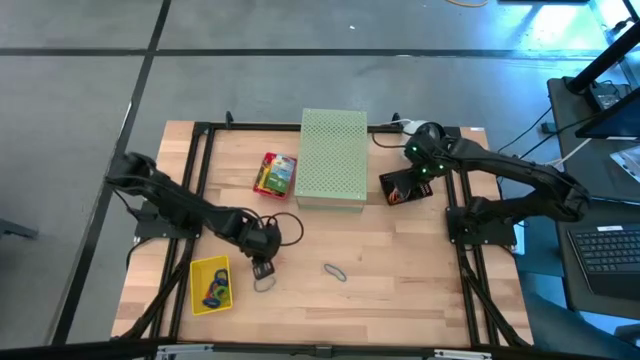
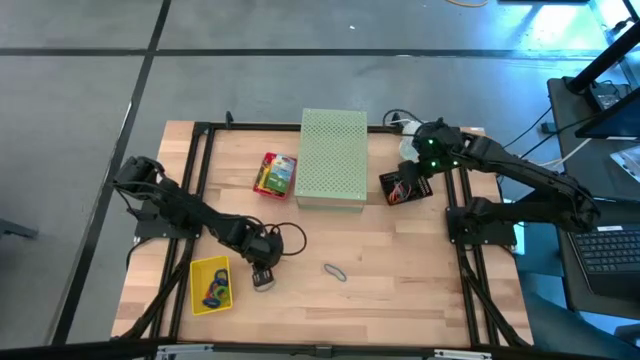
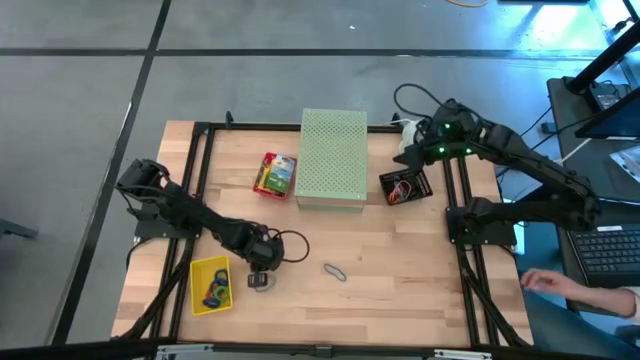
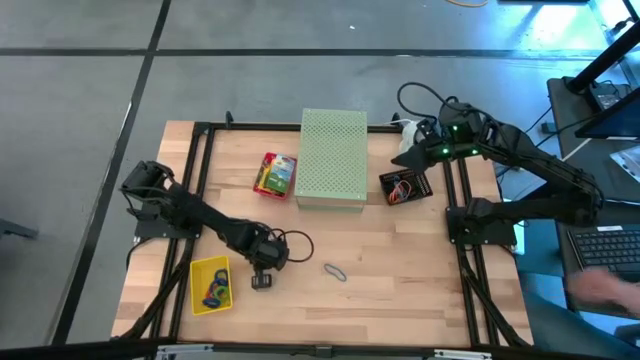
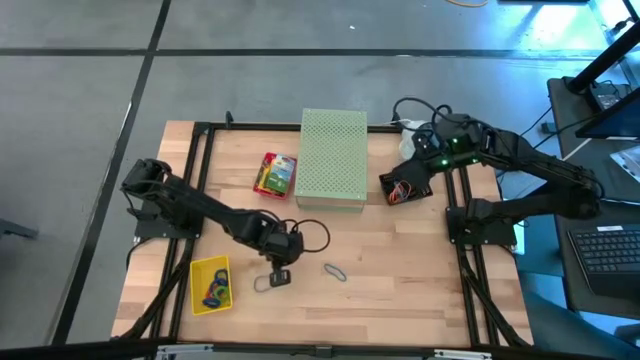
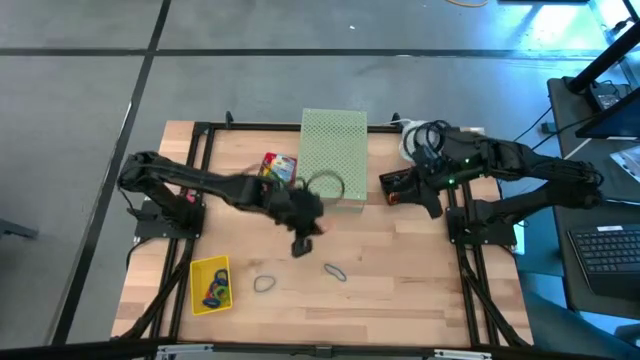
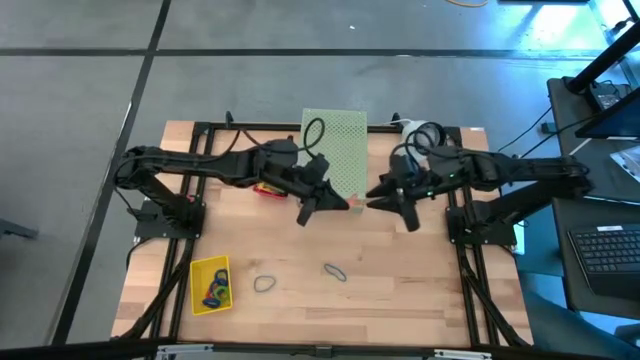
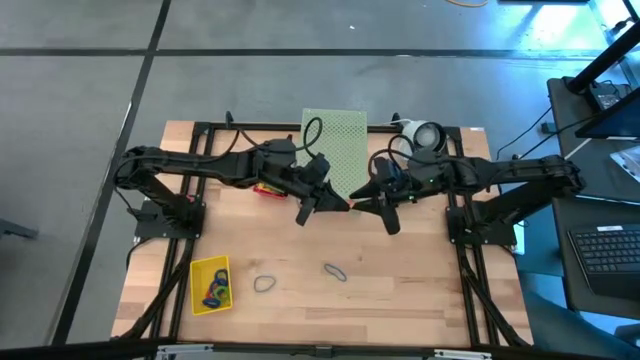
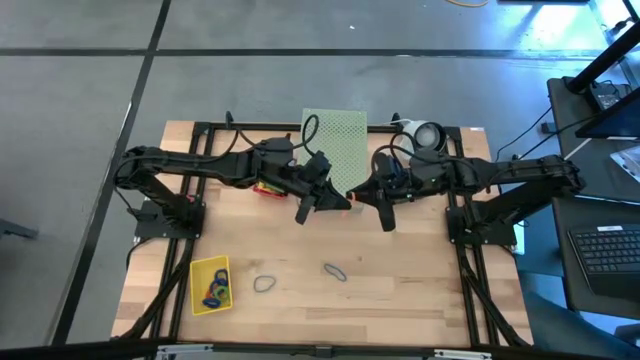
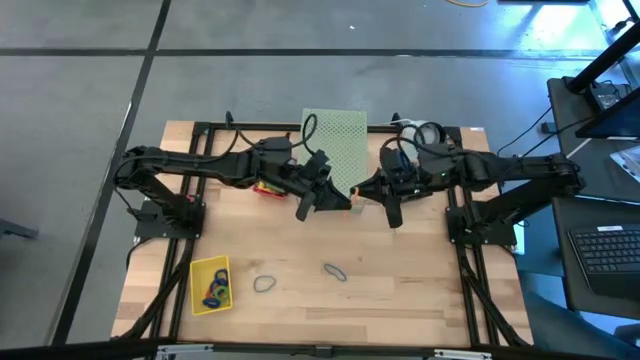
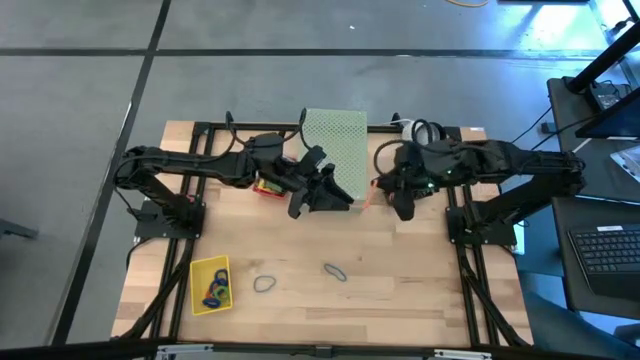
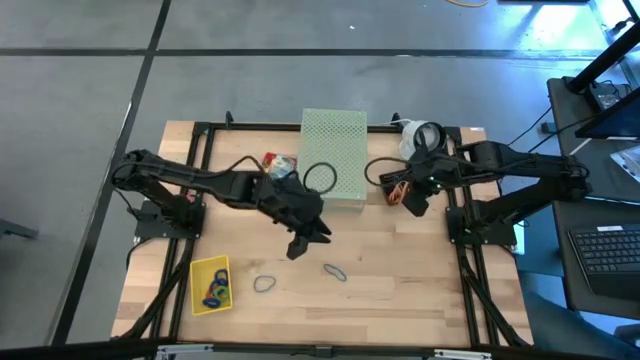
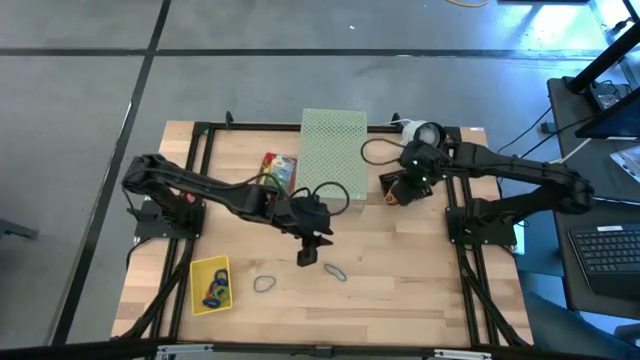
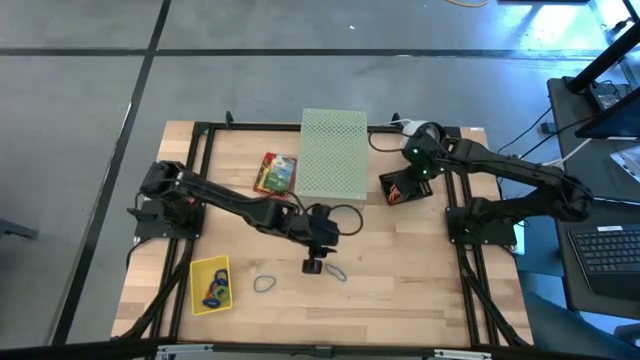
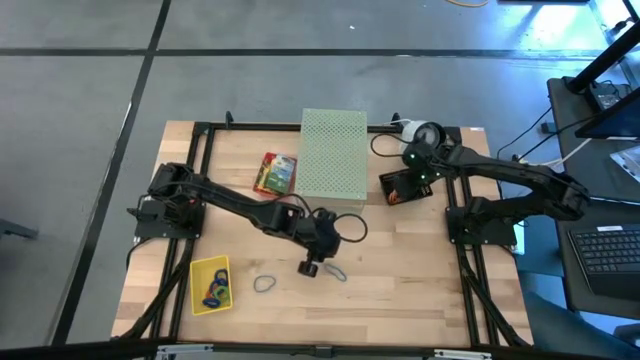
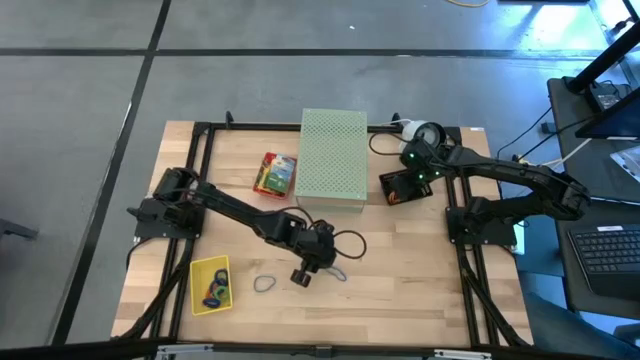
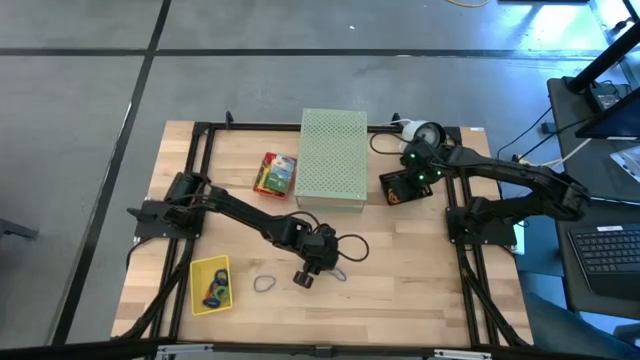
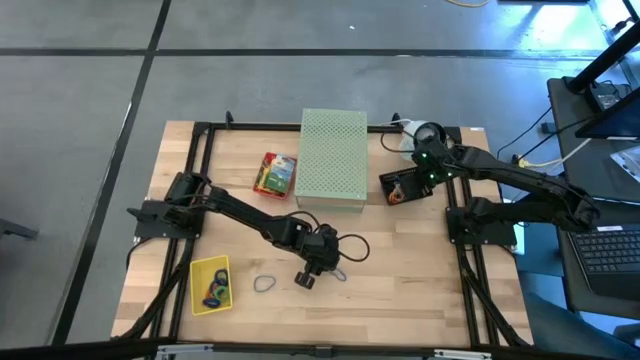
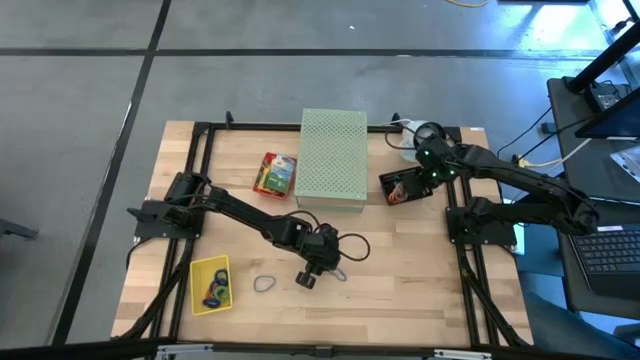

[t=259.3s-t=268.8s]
Task: Pick & Place Office Desk Supplies
Put the orange rubber band into the black bin

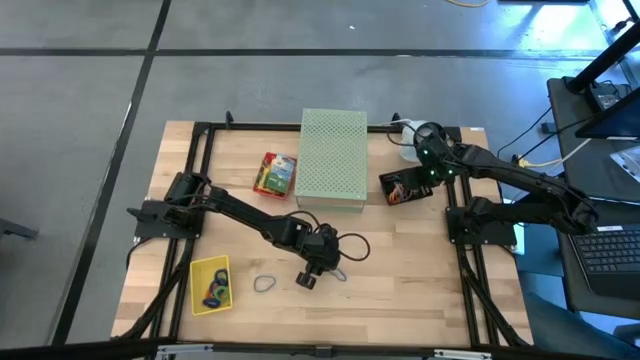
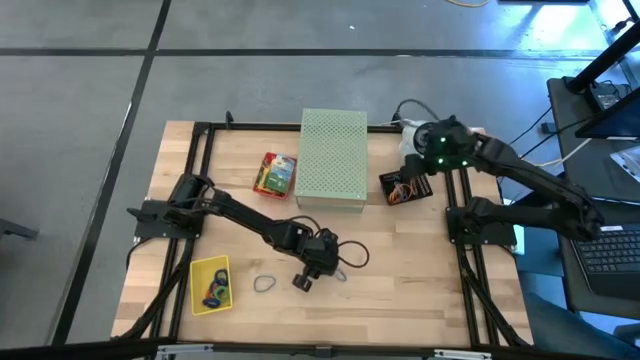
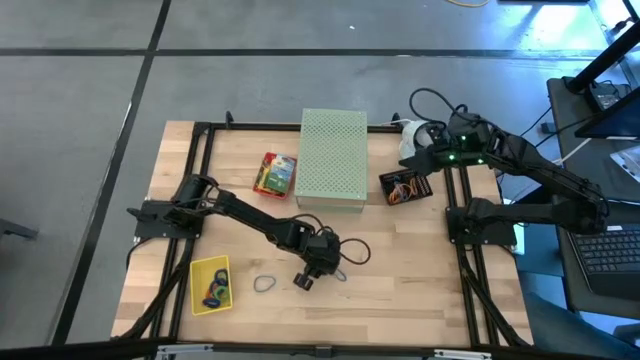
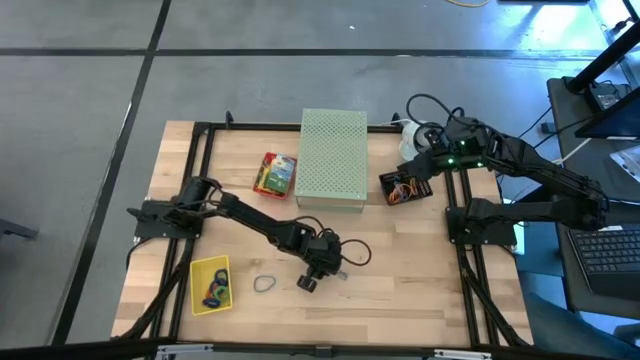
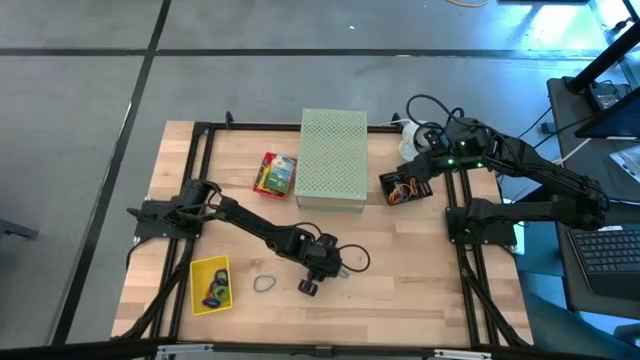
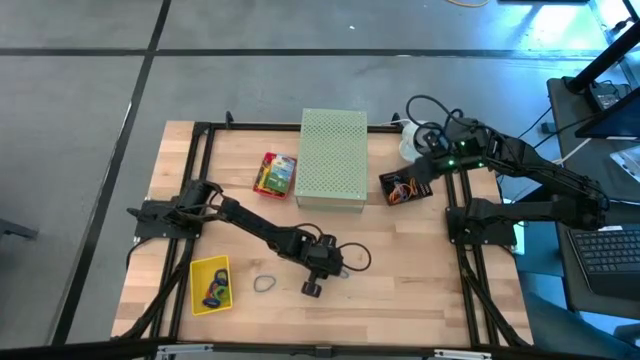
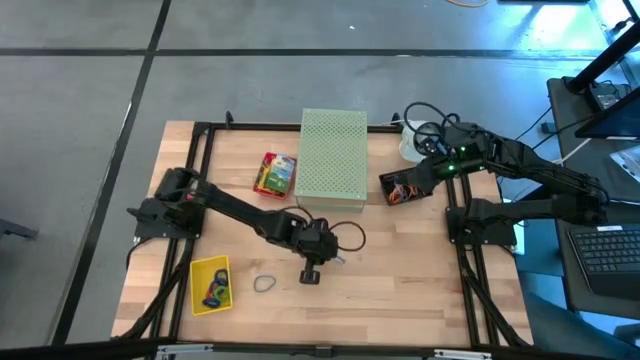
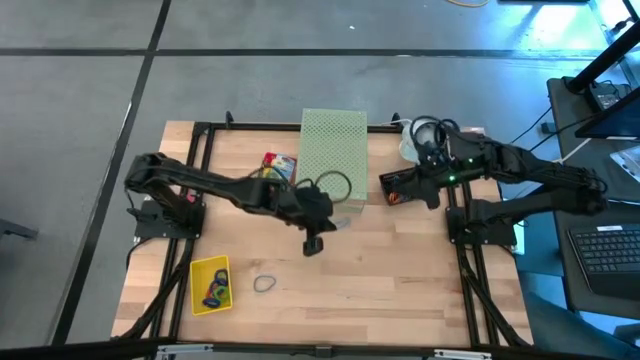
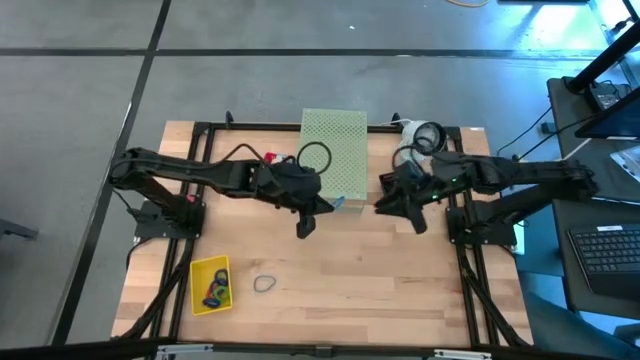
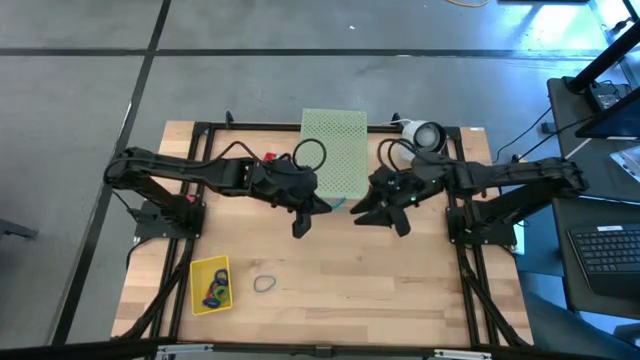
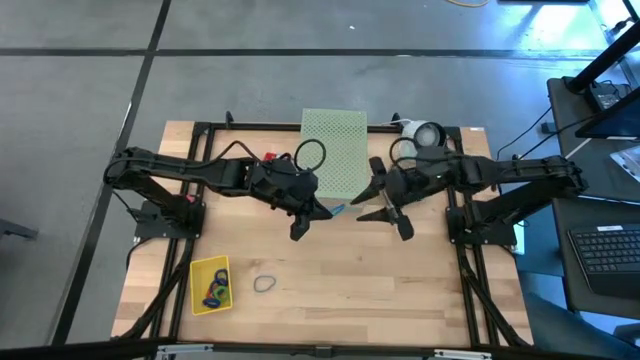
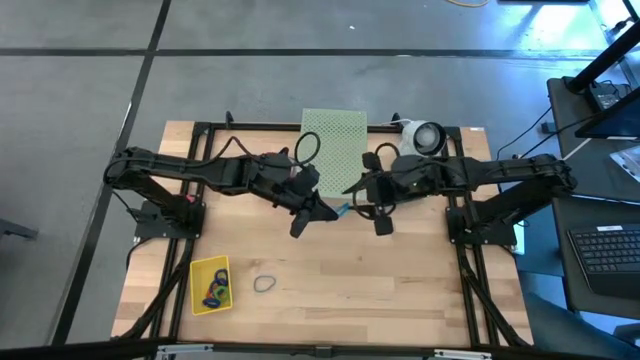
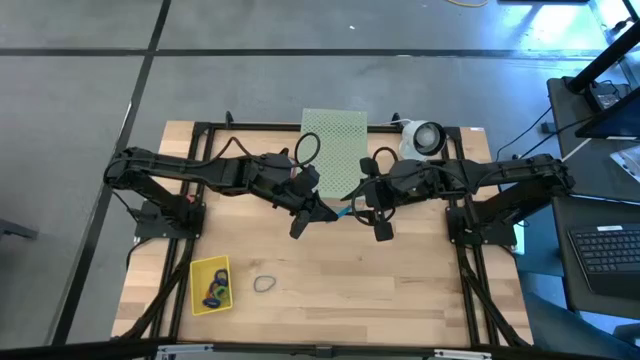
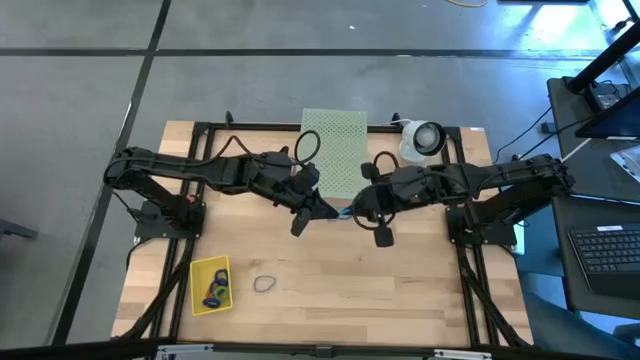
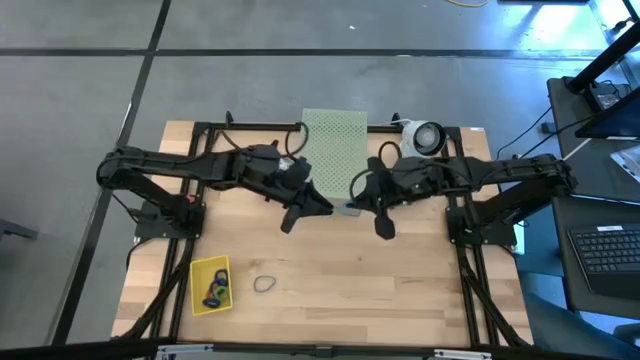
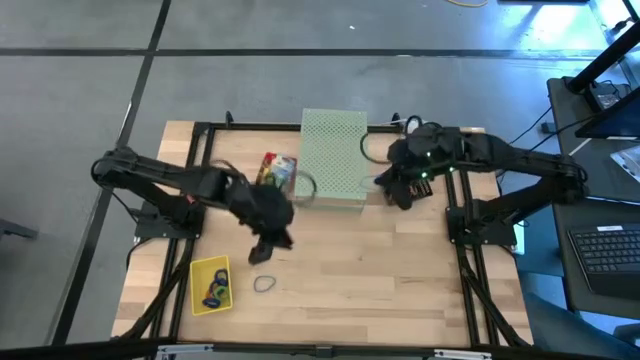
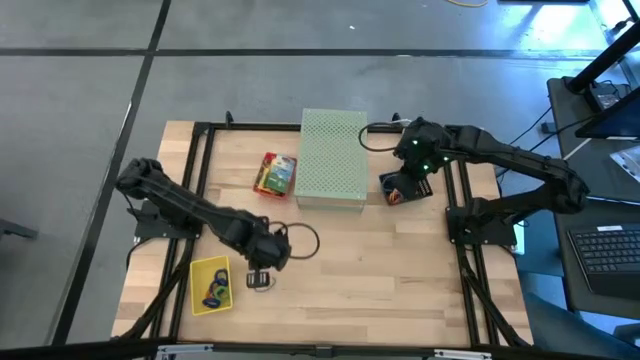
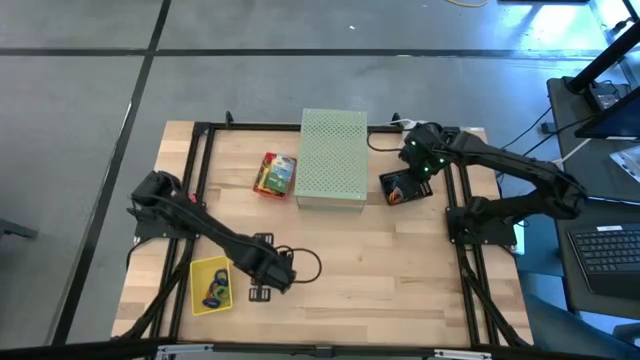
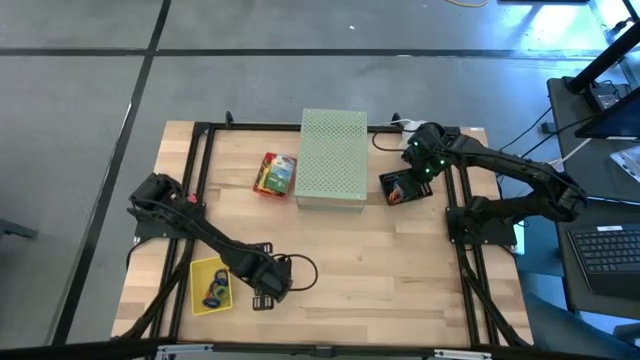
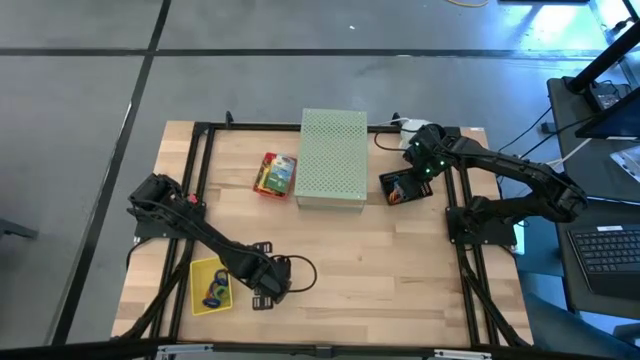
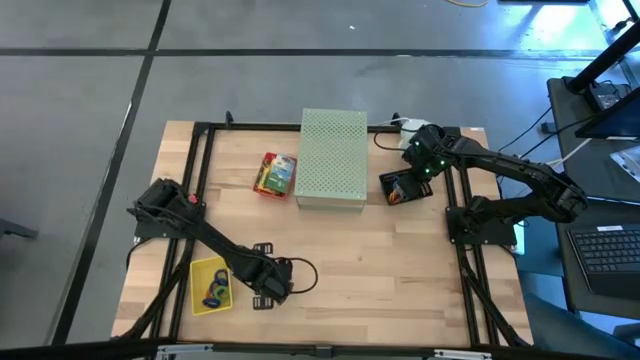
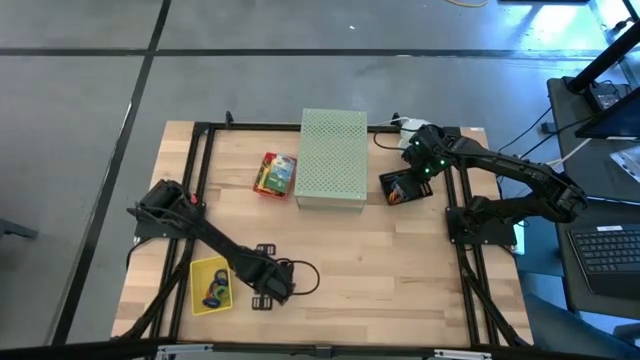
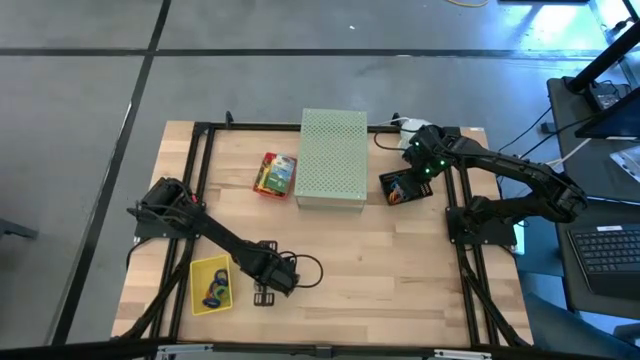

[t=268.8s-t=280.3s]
Put the blue rubber band into the black bin
